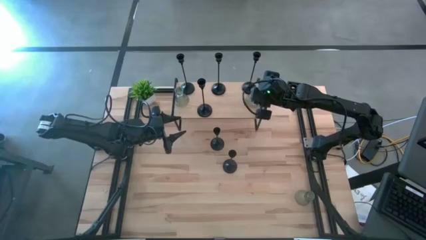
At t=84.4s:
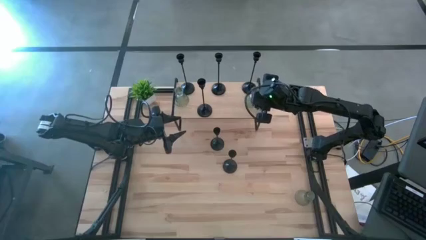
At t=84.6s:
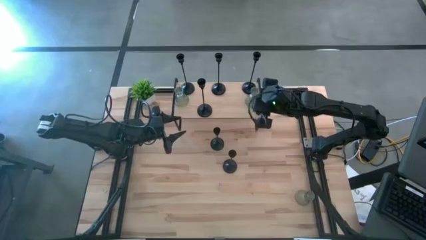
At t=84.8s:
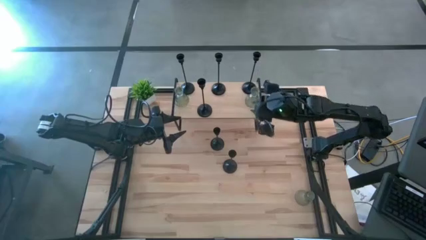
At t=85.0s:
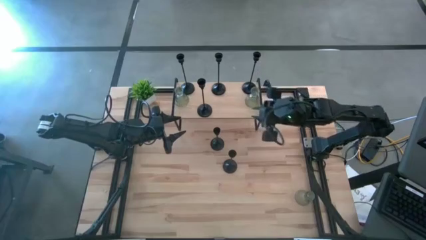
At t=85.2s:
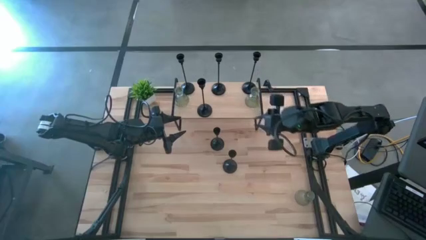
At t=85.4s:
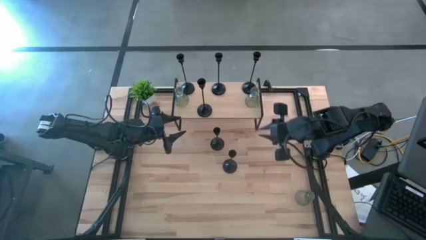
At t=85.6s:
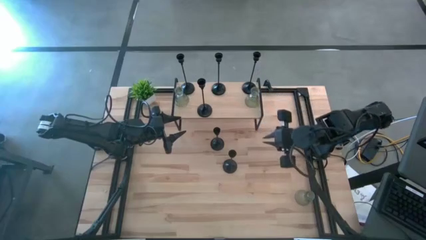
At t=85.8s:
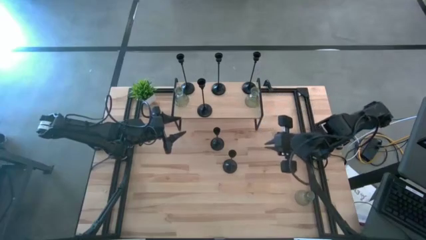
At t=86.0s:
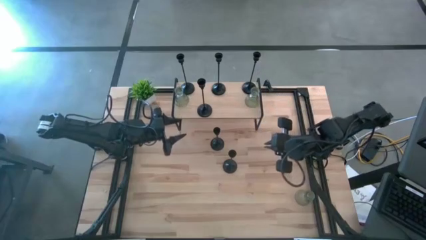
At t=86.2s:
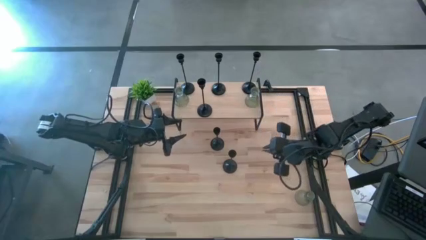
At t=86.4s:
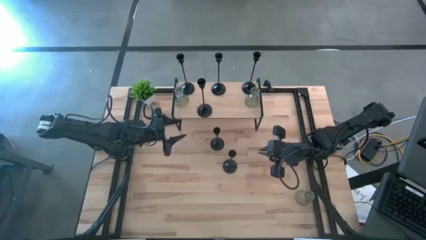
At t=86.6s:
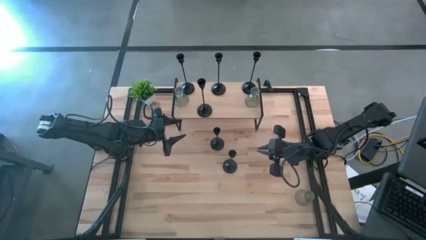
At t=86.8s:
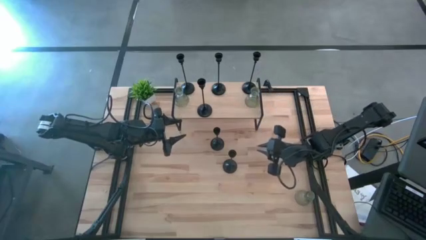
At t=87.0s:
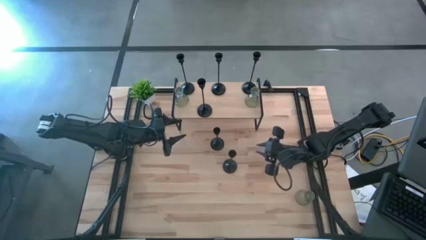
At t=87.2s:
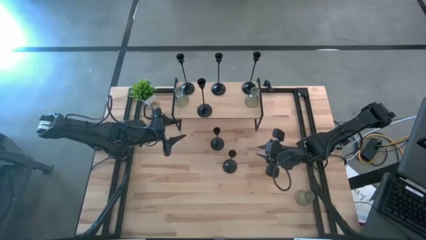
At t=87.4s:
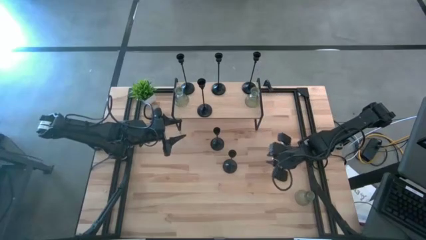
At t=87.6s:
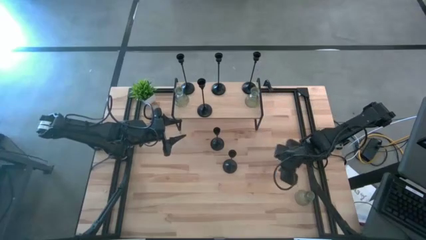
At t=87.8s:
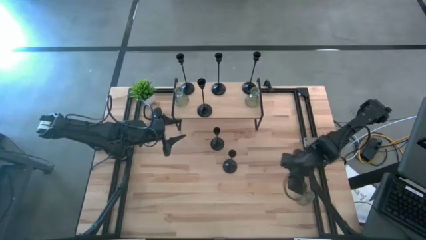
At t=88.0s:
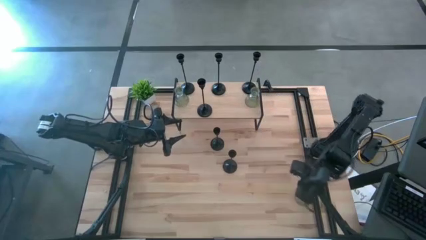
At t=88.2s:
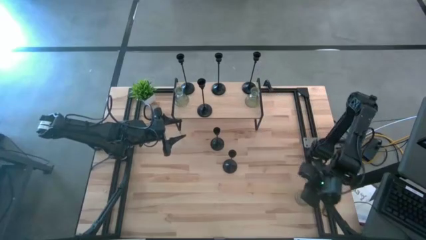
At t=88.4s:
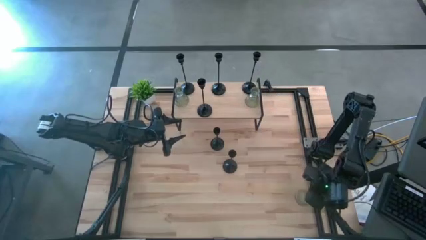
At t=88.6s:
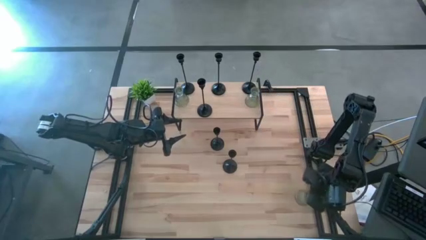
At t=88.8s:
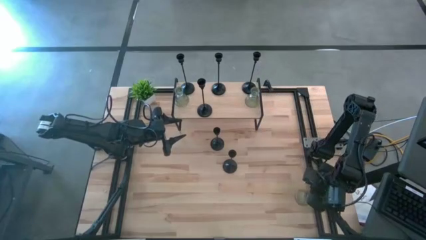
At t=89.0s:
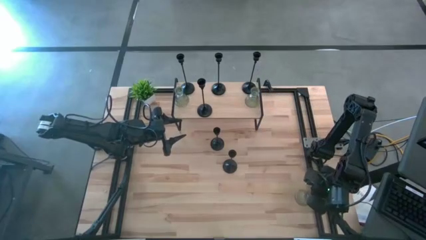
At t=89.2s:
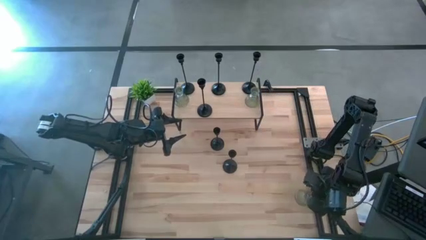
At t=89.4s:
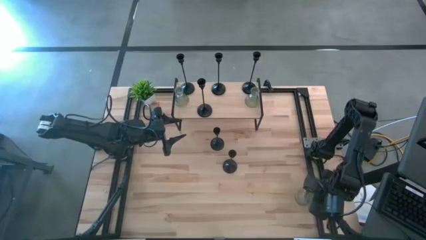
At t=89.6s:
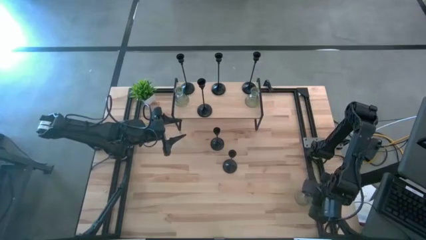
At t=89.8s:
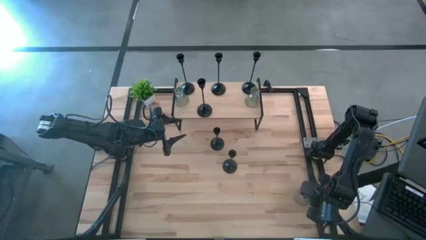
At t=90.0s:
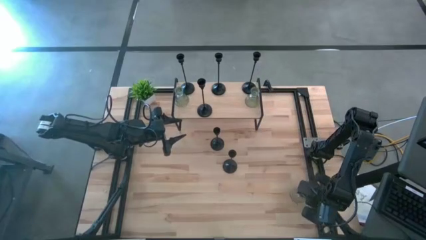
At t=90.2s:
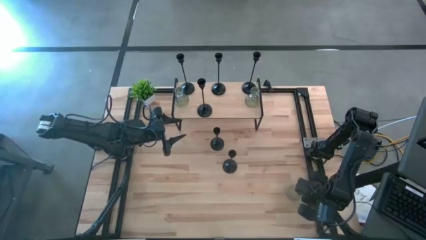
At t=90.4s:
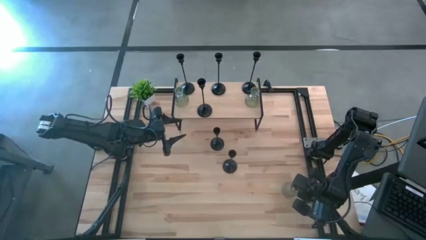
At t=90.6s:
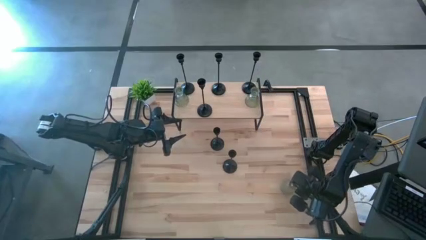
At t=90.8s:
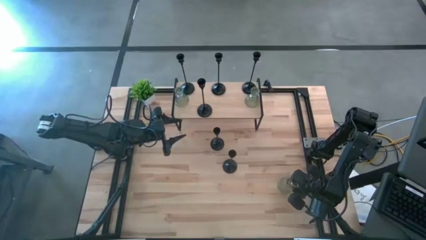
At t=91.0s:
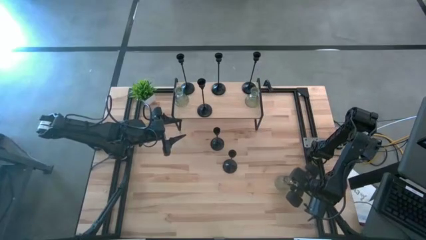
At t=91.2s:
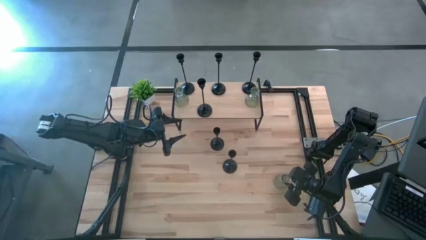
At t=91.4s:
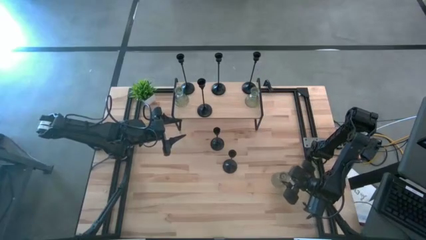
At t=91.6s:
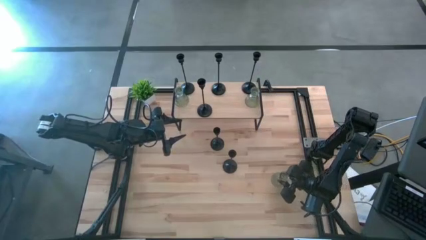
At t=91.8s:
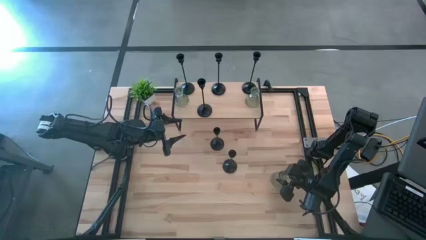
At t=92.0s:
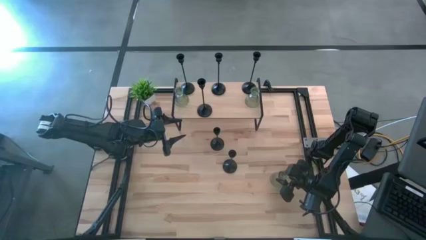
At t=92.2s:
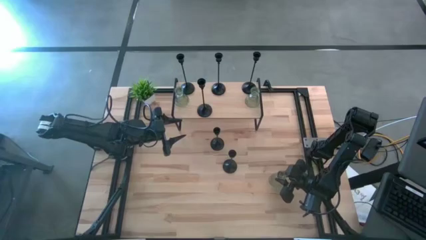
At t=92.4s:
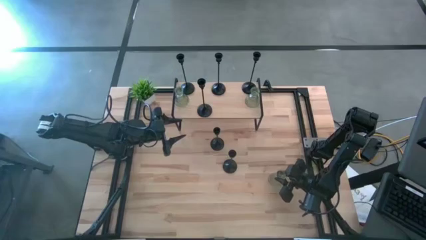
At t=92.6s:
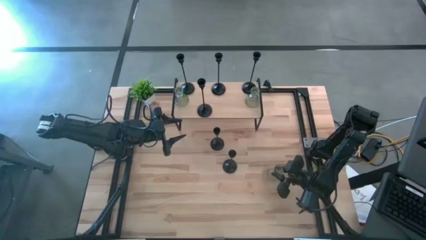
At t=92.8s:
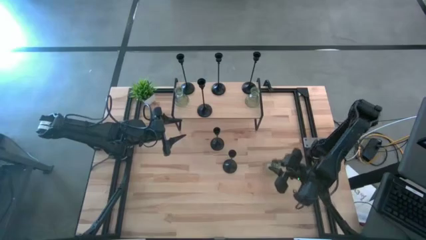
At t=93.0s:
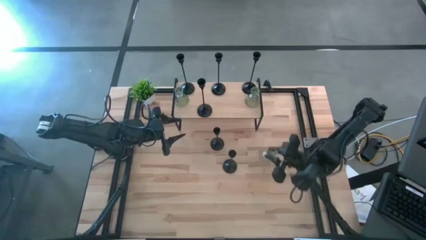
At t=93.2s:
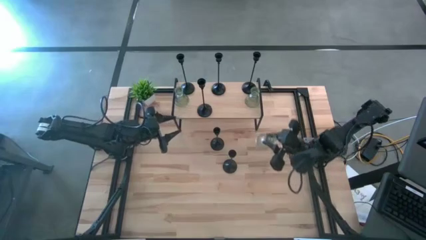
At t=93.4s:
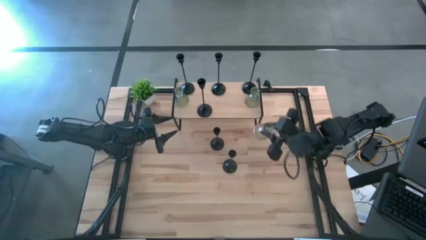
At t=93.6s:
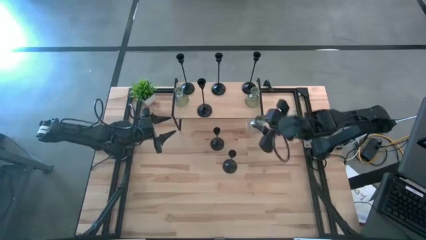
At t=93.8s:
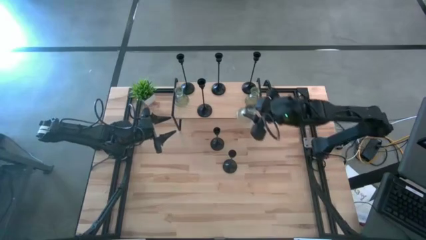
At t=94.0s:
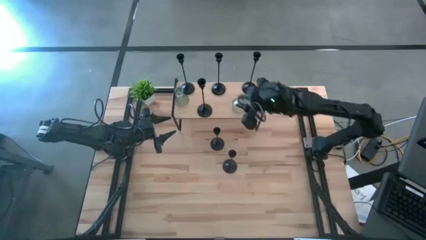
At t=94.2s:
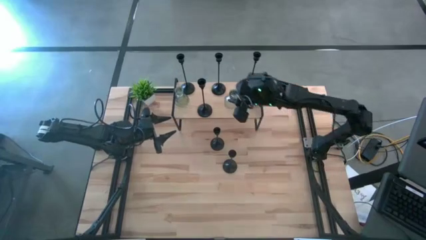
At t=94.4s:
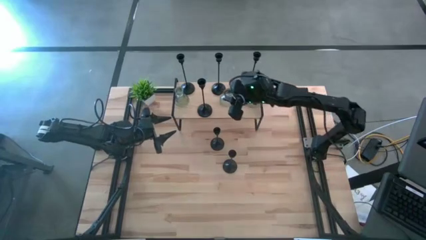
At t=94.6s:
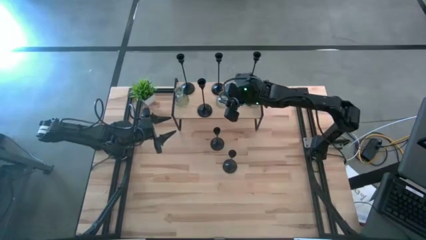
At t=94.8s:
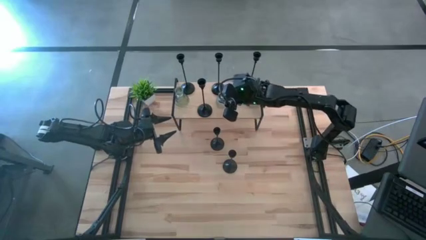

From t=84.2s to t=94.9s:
Task: Pick & Place candle stick holders
Put the green candle holder on the shelf

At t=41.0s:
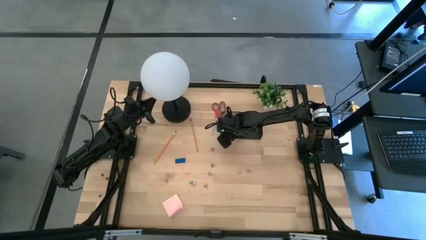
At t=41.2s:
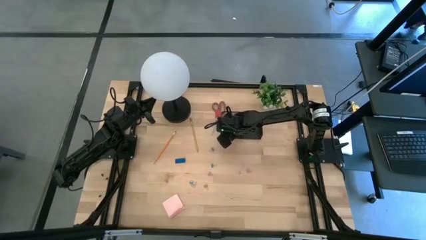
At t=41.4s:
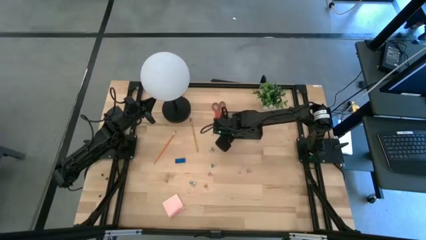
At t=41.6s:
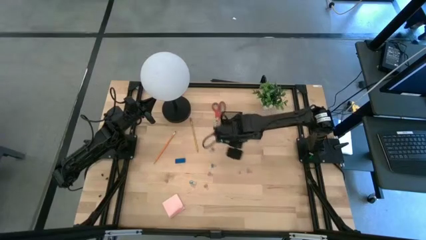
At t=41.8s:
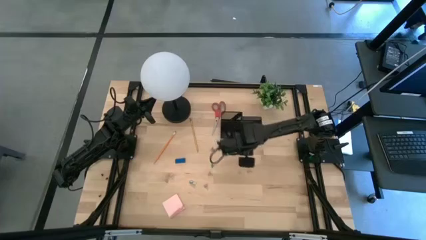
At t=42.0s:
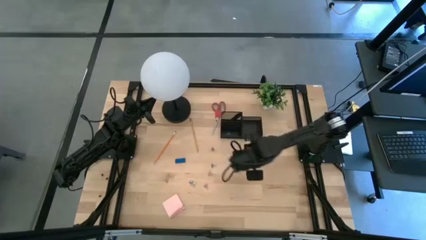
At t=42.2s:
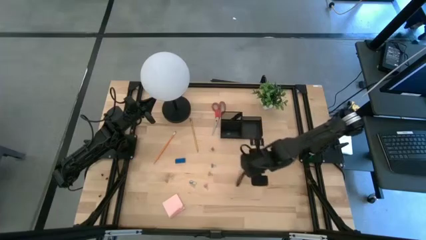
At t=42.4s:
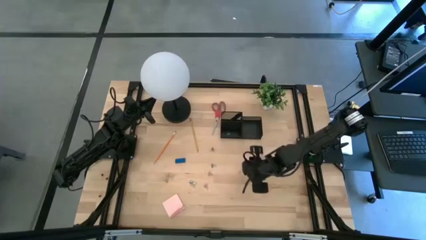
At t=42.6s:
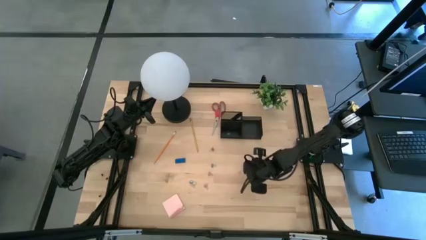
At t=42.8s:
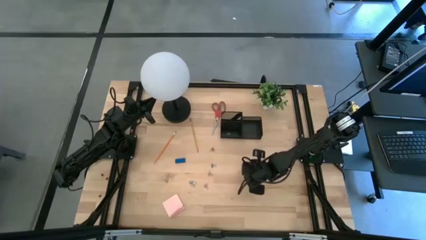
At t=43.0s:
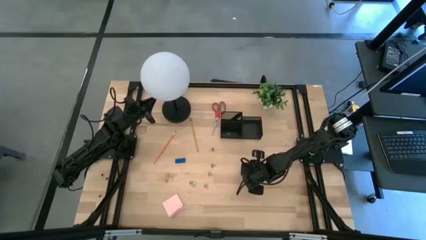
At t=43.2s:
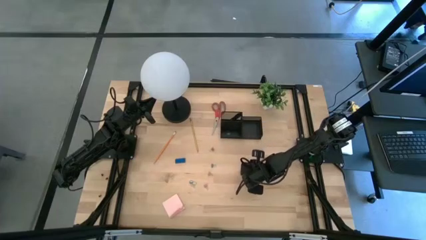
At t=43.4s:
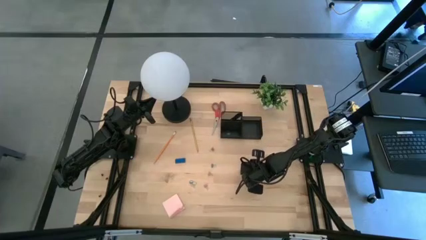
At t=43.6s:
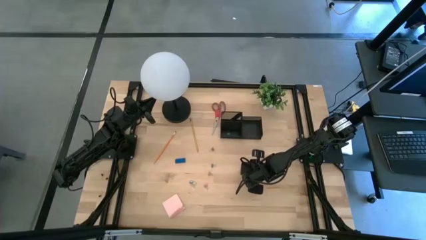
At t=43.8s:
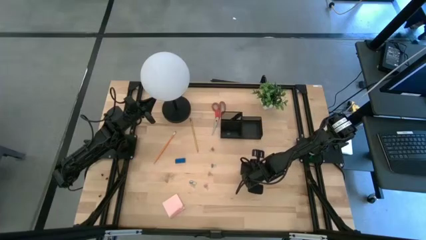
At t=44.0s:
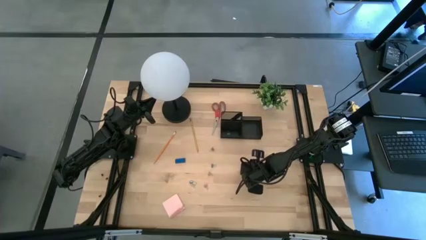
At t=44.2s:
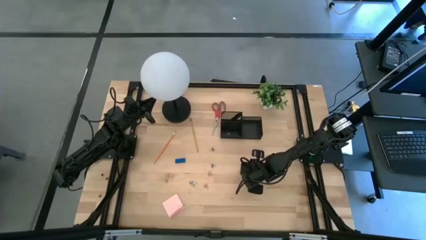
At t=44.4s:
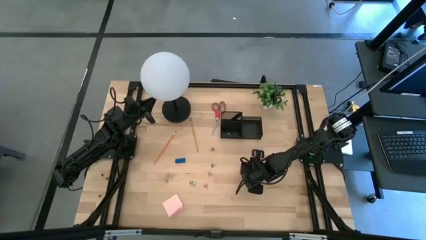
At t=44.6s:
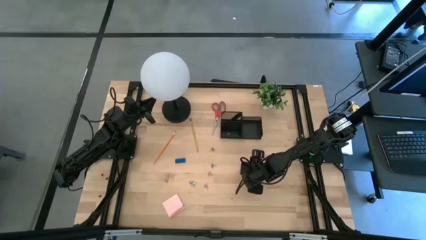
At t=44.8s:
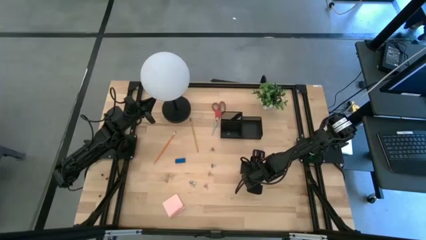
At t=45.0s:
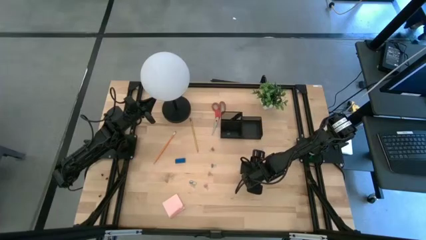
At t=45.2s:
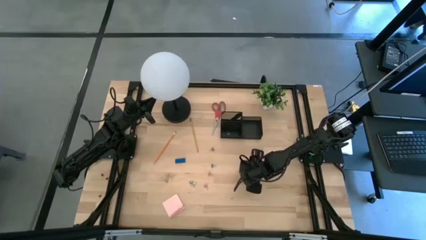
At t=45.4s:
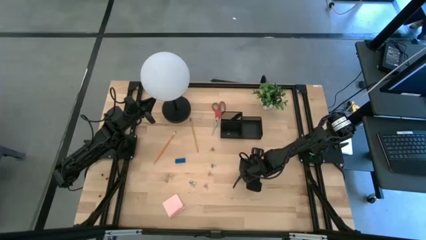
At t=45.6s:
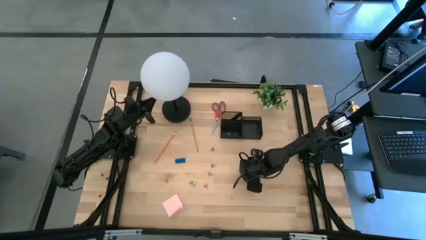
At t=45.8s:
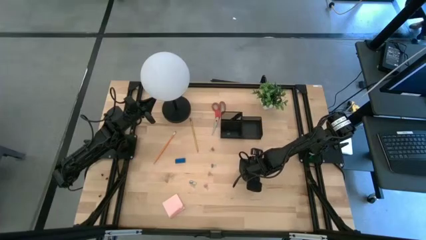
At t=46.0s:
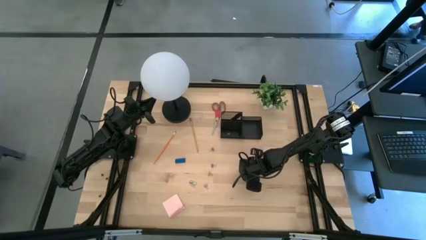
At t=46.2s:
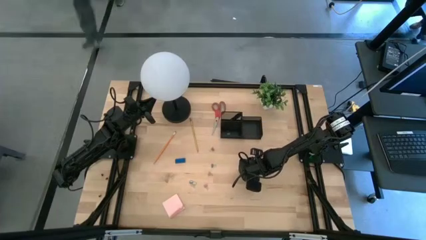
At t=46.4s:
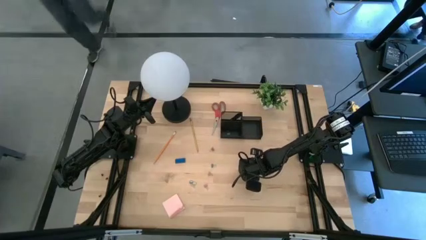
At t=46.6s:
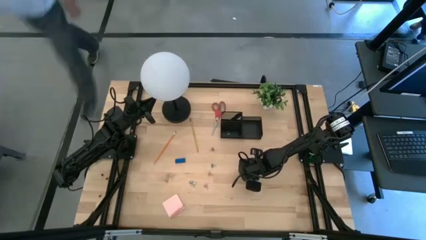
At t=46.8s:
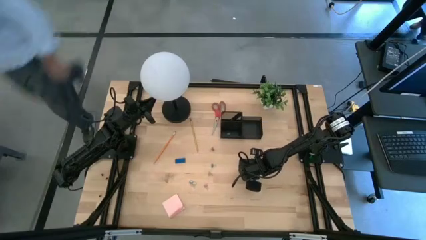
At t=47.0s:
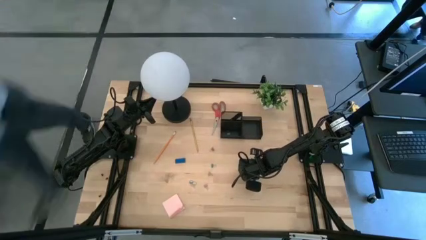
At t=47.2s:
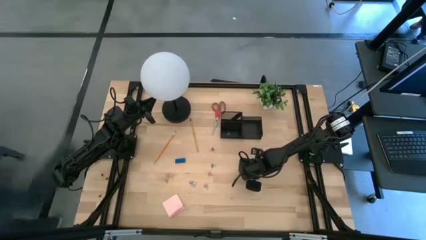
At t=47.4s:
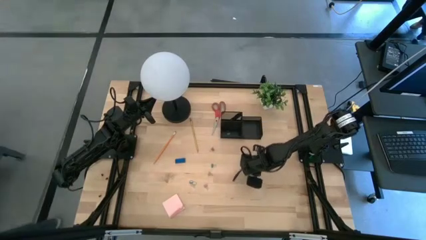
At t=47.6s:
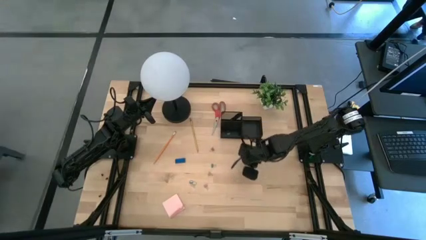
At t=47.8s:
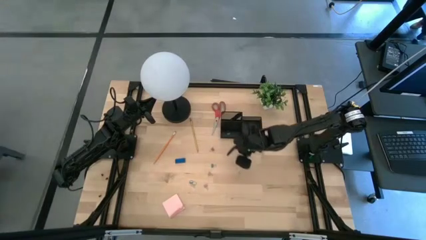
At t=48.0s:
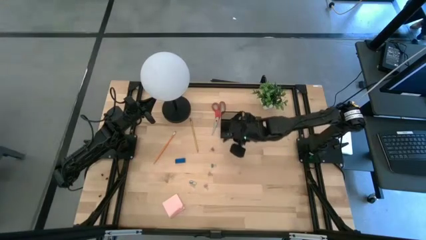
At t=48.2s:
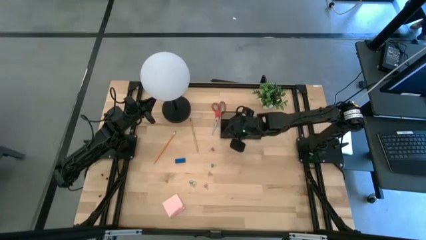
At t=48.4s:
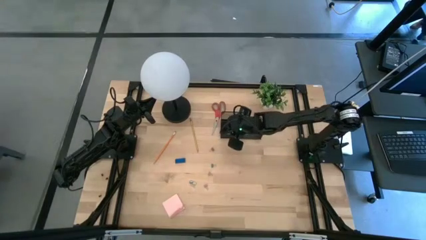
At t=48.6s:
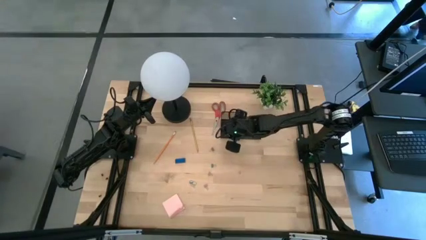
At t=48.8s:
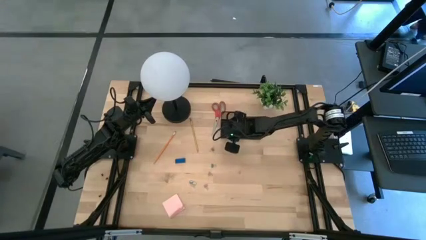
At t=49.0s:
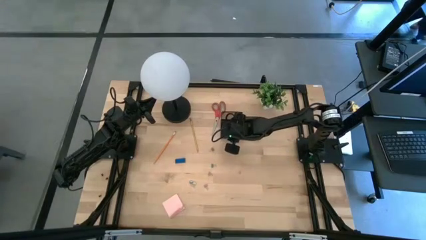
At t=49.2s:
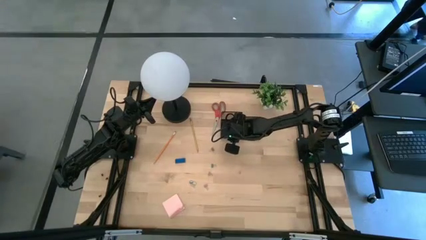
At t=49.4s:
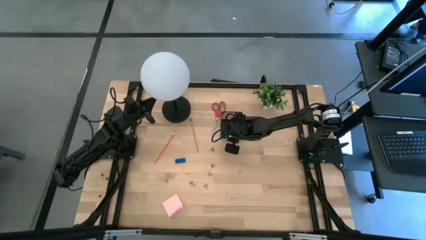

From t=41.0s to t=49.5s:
Task: Pick and place office supplies into organizer
Put the pink clip binder into the black desk organizer
